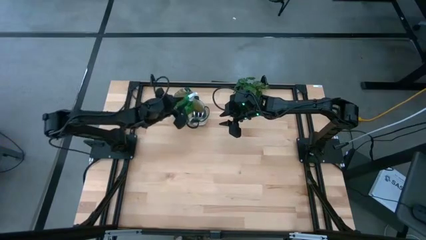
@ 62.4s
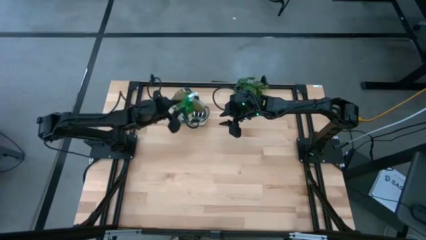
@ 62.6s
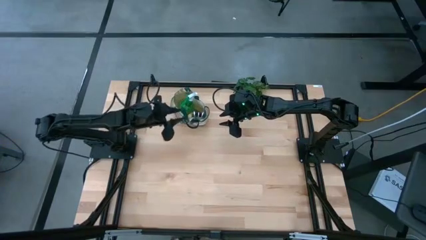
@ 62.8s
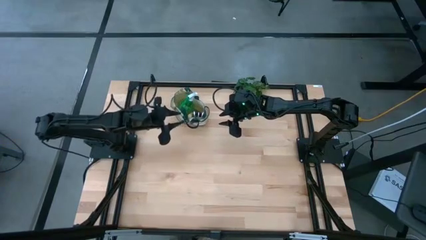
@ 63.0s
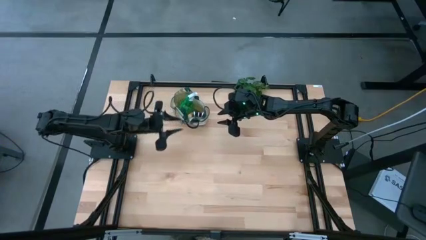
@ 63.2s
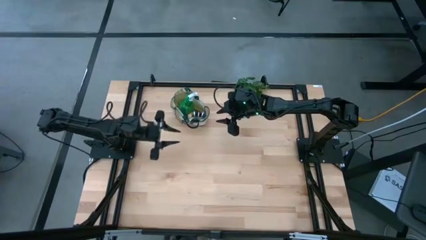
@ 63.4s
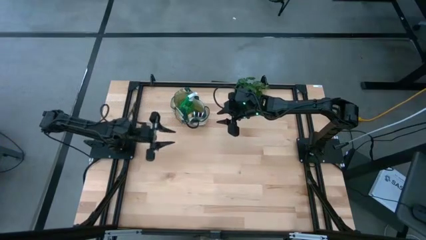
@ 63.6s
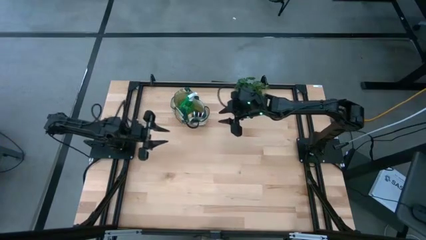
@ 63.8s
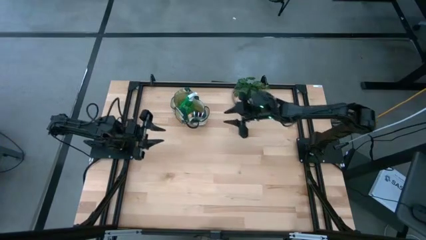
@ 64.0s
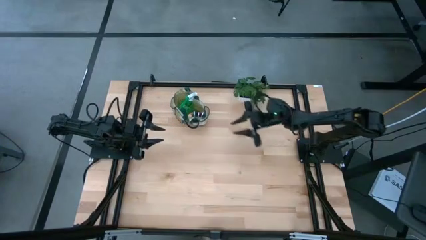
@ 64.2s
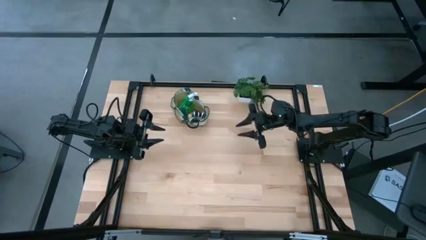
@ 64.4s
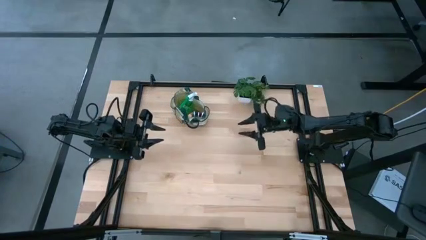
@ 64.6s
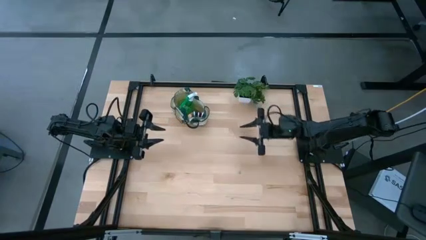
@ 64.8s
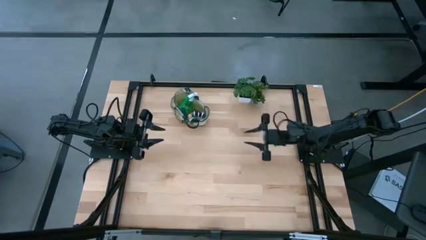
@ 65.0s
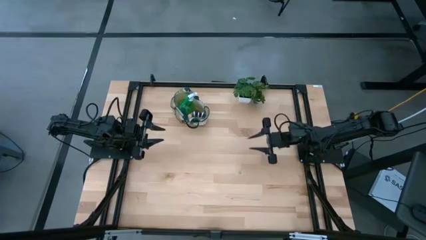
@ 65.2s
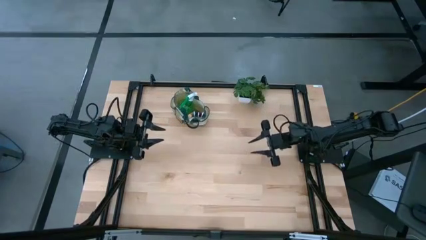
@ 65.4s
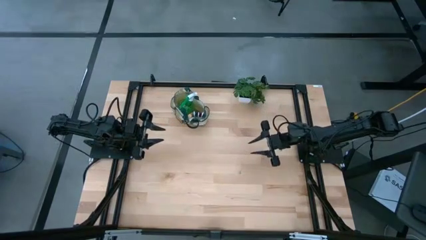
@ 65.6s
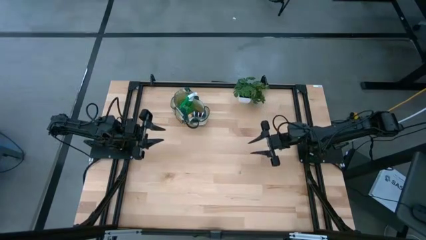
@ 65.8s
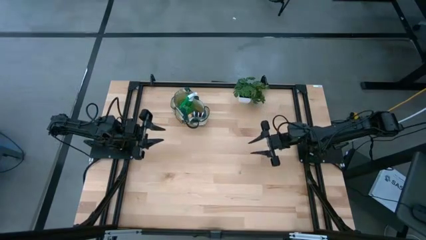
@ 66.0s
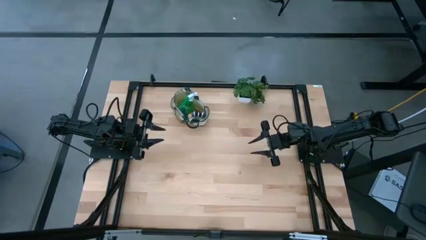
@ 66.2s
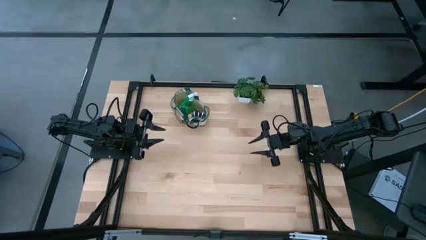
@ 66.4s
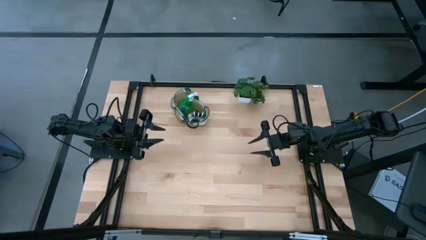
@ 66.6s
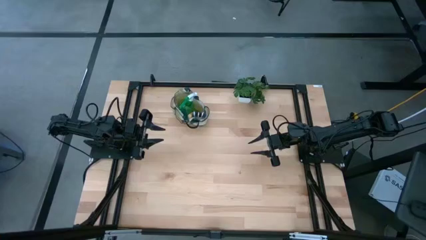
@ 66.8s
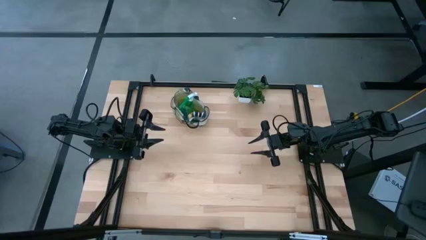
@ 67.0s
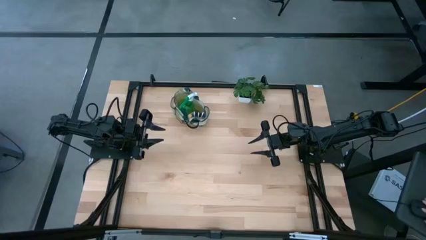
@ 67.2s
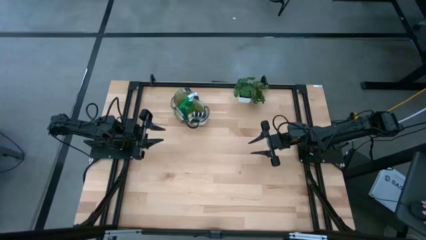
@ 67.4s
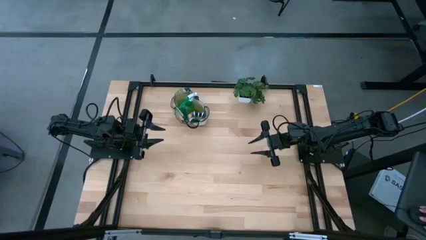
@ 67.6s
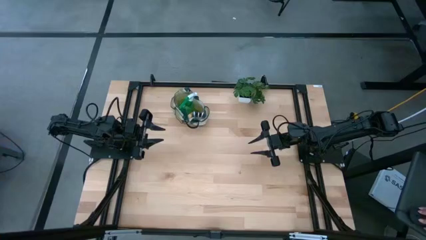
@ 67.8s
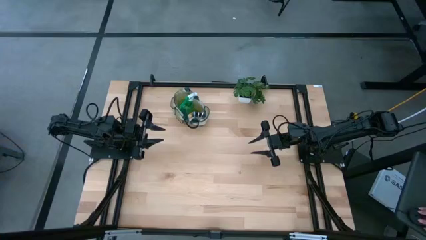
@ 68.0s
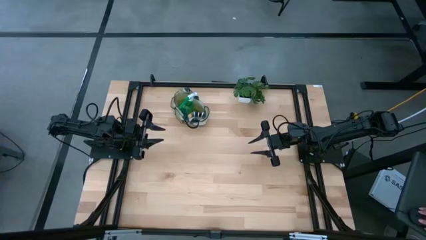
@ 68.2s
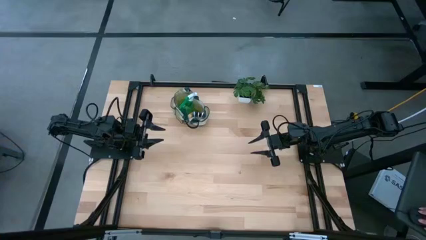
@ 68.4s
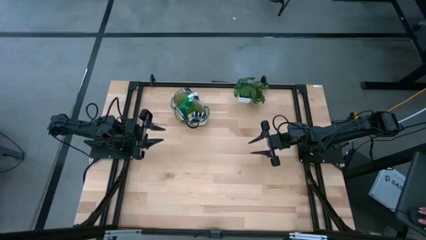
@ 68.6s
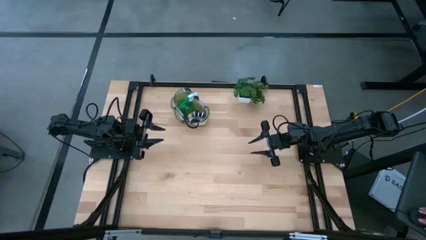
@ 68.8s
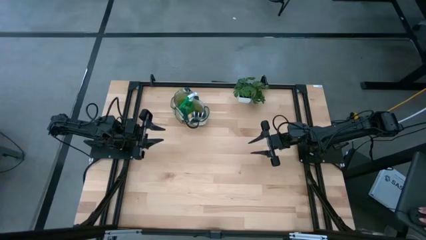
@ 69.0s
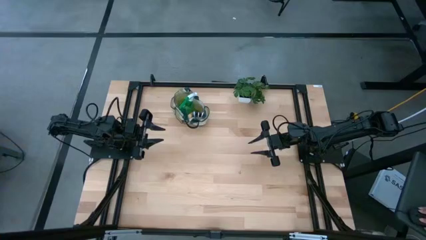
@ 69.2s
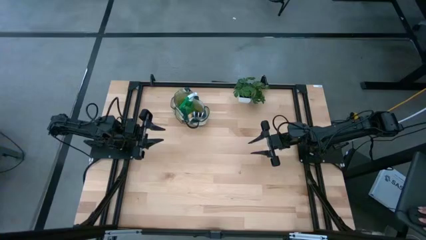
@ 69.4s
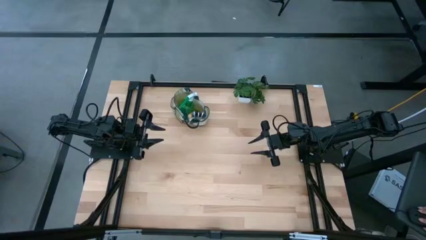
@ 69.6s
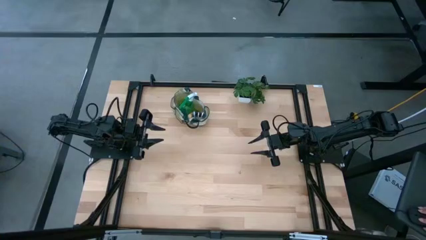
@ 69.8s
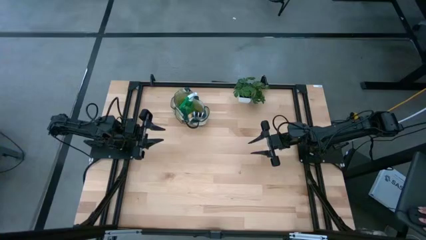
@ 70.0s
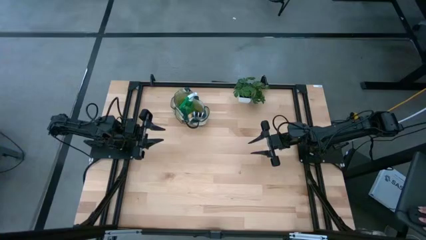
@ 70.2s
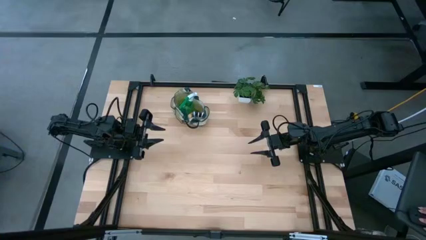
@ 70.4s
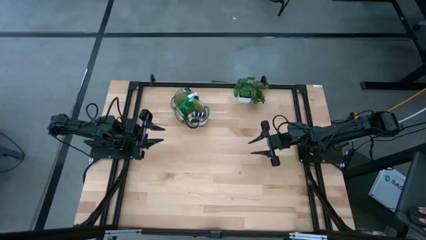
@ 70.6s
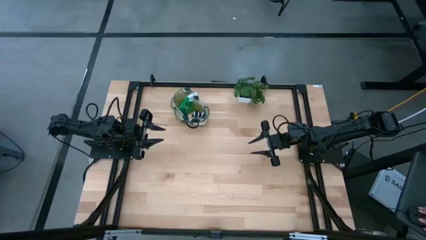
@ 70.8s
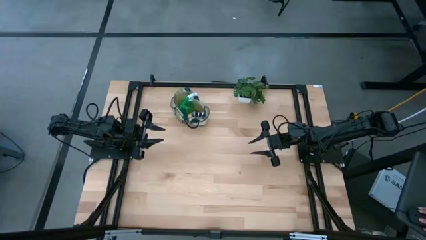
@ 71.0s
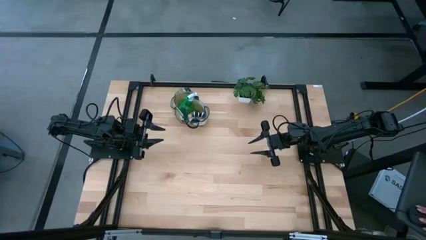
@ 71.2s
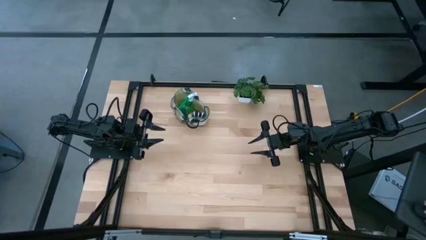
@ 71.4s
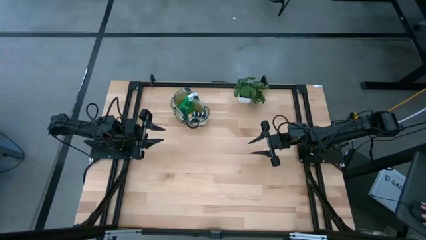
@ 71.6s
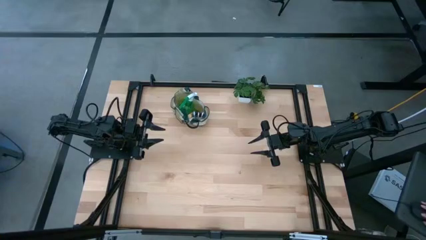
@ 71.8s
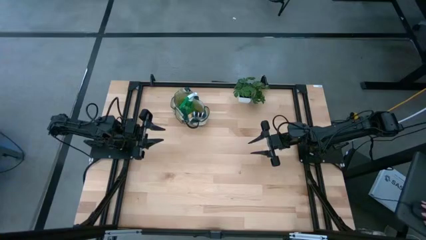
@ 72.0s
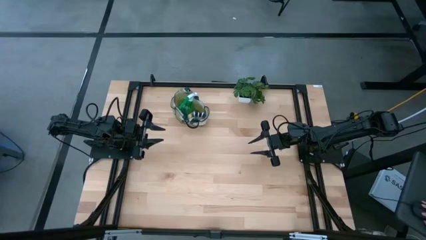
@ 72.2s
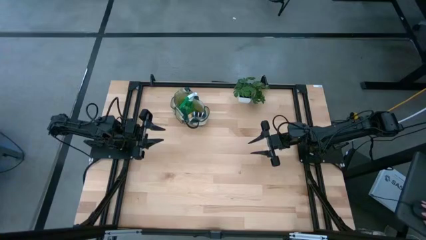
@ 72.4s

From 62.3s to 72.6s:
Task: Pick & Place Garden tools in Gardening bag
Return to Home Position

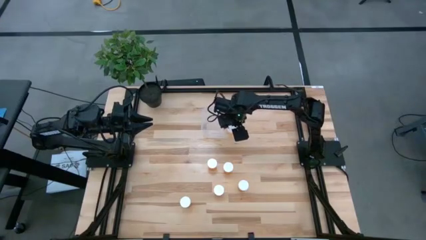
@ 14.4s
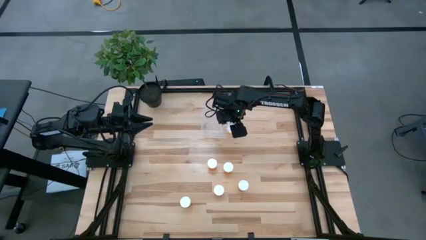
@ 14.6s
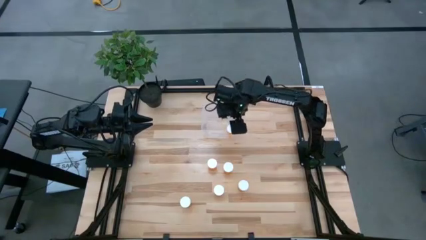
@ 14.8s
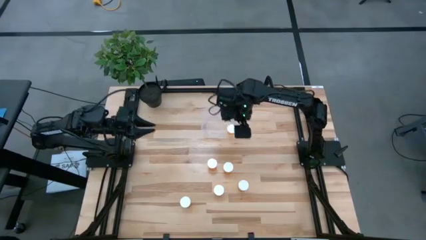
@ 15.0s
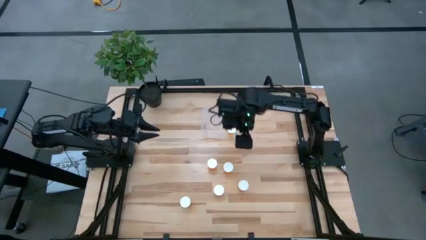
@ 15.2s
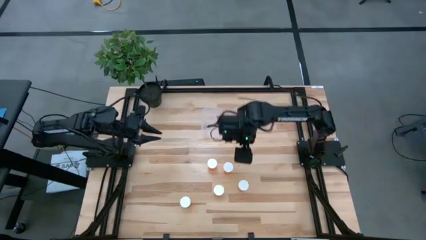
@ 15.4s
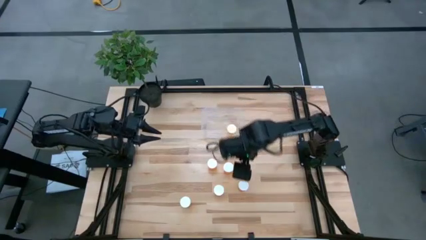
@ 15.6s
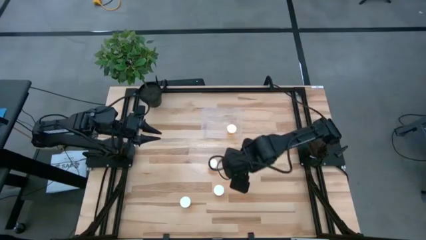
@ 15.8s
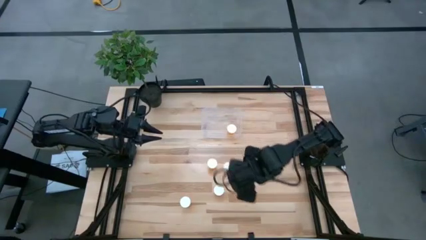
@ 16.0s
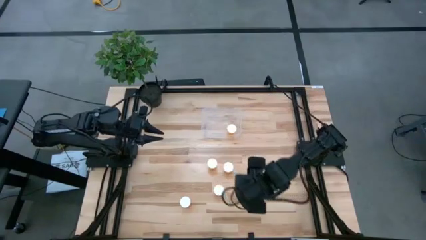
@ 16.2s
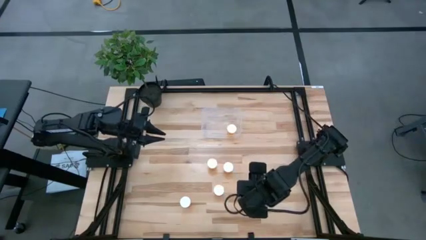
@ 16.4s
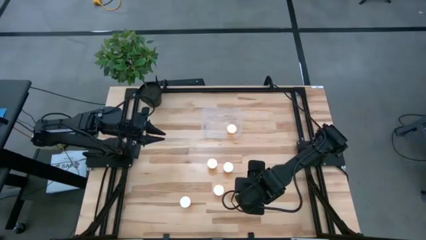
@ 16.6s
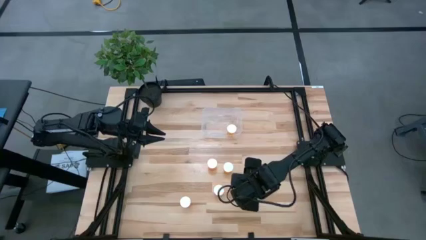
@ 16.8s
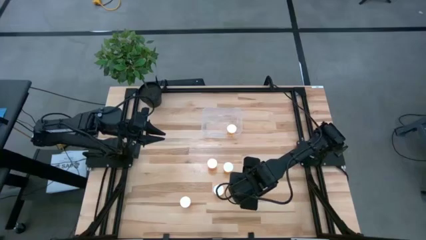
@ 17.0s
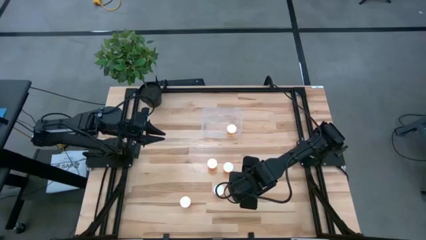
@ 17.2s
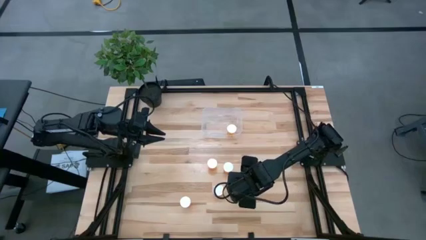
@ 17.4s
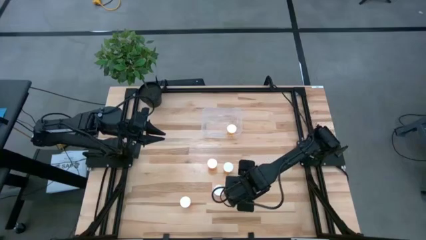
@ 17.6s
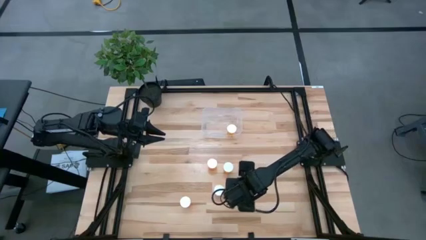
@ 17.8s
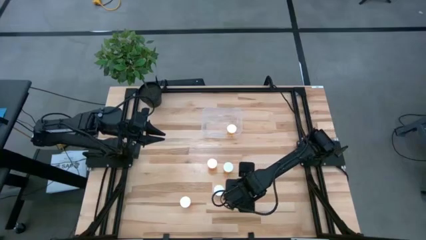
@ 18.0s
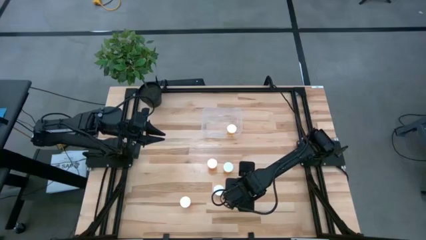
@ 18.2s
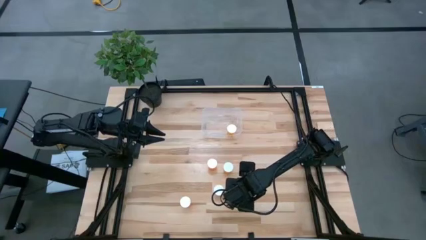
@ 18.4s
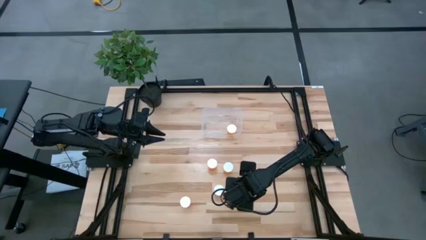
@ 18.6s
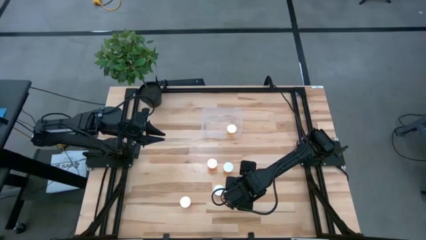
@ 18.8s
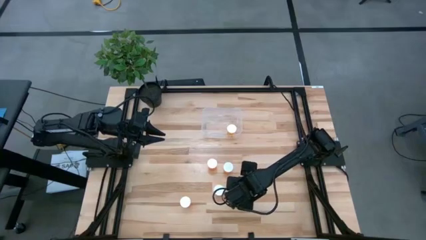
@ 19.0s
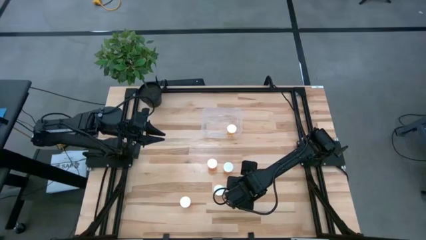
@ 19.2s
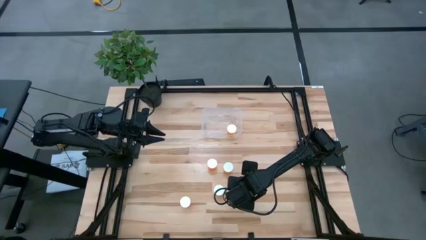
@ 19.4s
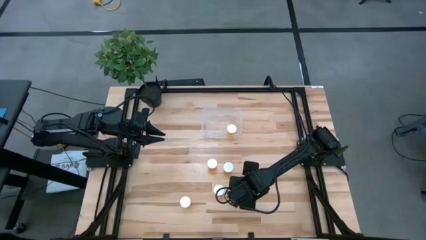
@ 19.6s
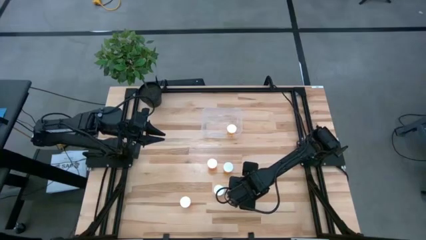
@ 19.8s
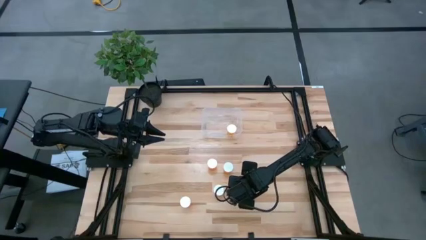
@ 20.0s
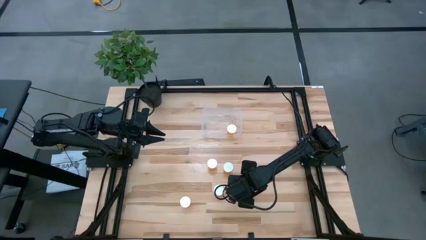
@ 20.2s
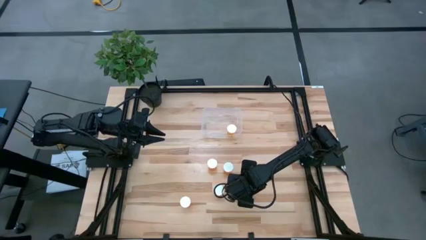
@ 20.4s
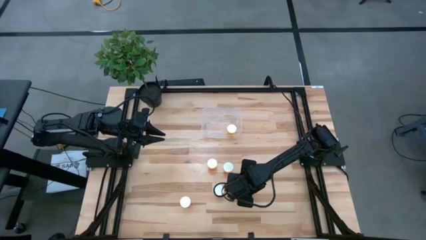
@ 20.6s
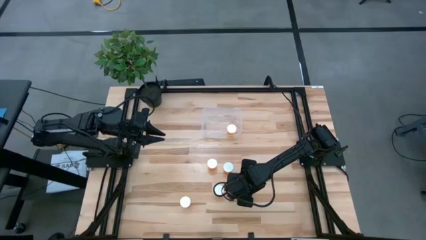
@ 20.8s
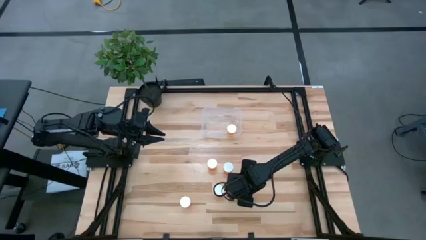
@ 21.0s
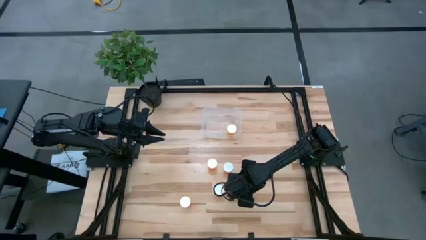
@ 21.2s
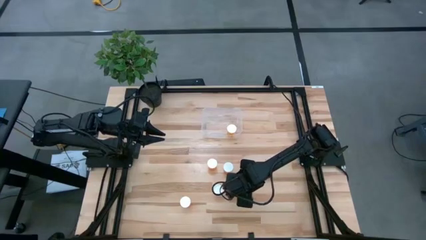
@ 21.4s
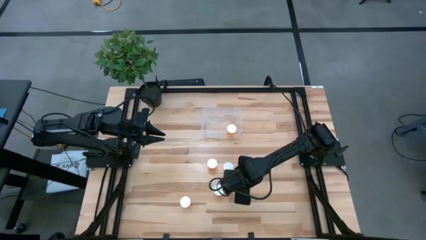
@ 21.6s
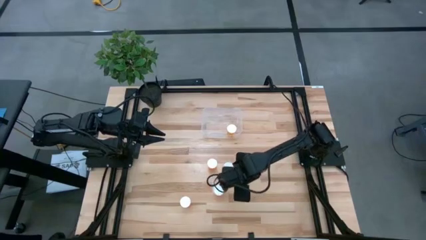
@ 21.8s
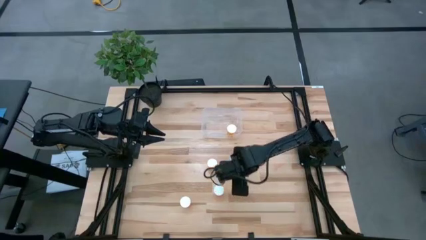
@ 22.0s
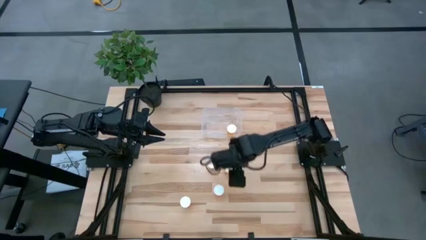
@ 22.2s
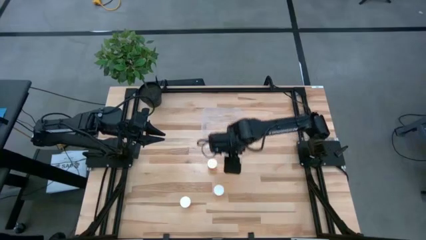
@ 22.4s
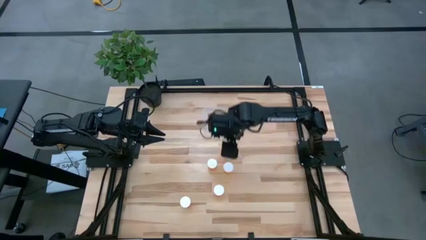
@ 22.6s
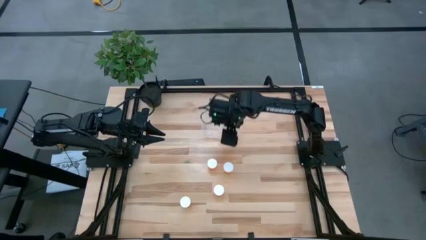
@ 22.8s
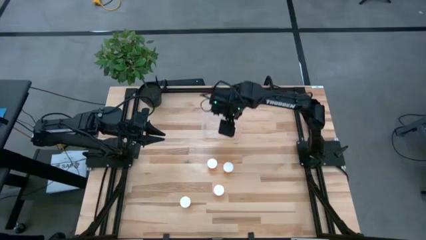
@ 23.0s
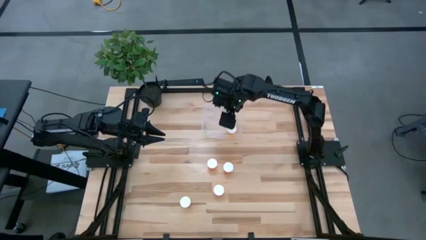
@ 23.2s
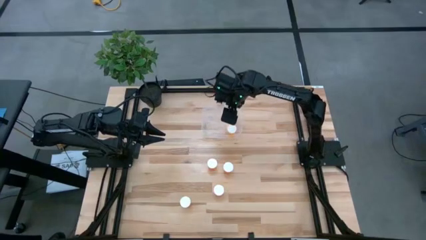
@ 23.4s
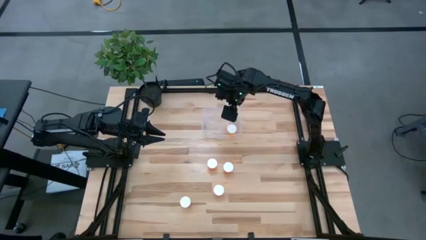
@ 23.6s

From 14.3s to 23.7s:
Task: Pick and place pill bottles into a basket
Put the orange pill bottle into the transparent bin
